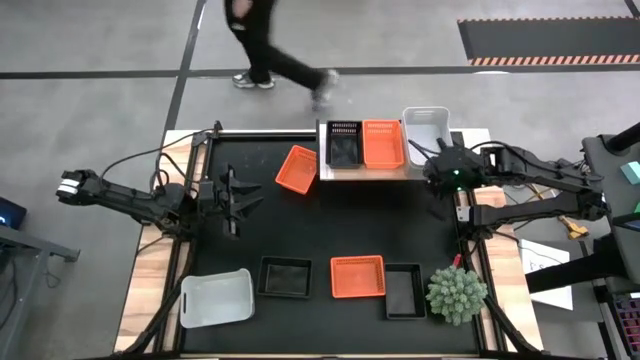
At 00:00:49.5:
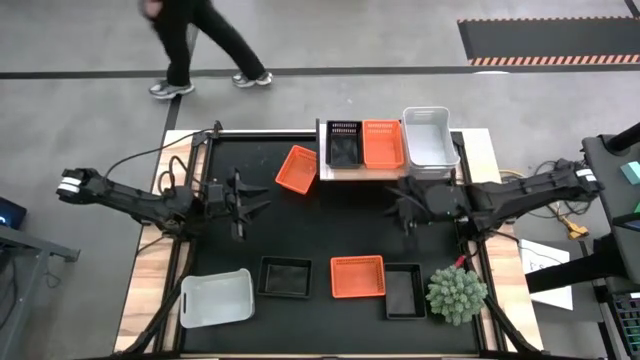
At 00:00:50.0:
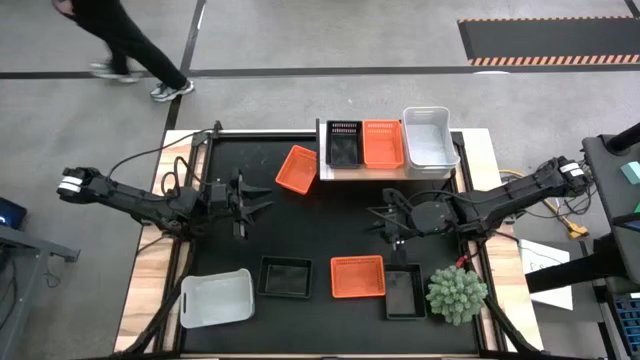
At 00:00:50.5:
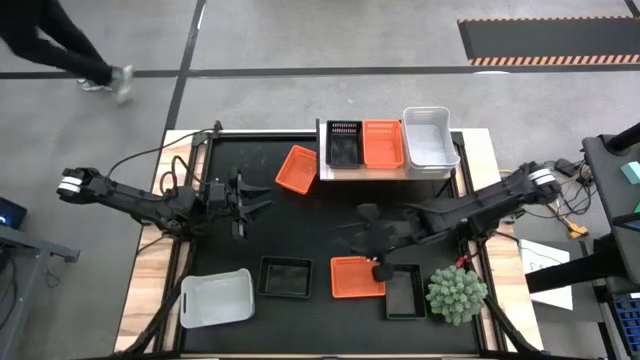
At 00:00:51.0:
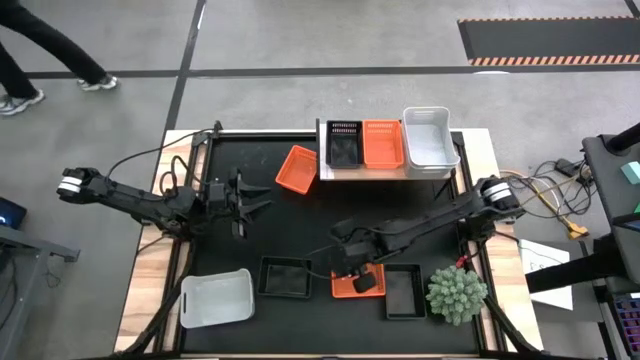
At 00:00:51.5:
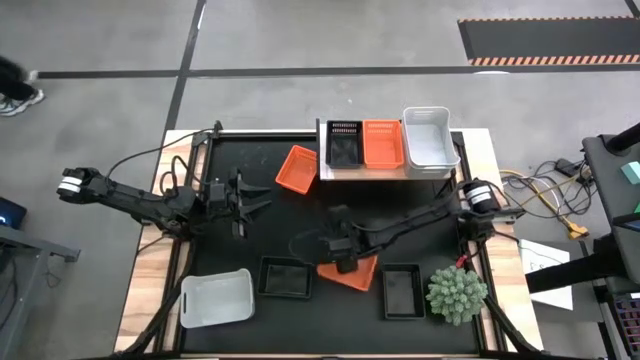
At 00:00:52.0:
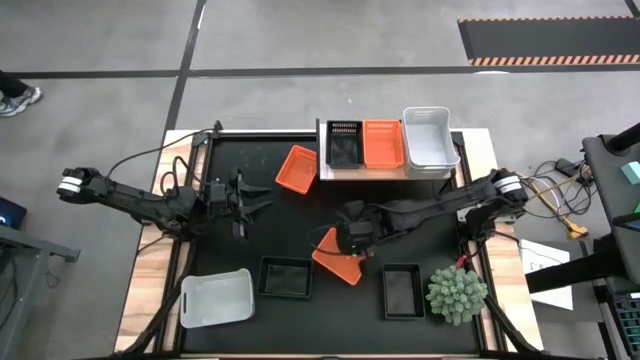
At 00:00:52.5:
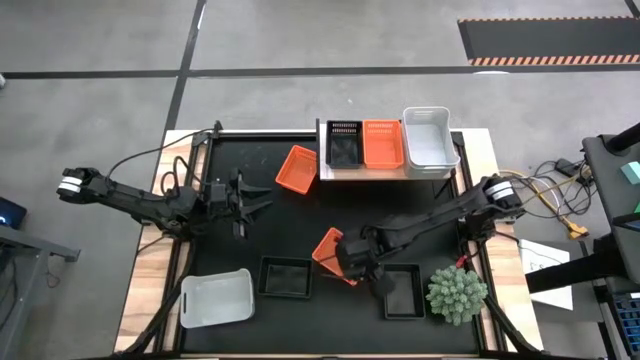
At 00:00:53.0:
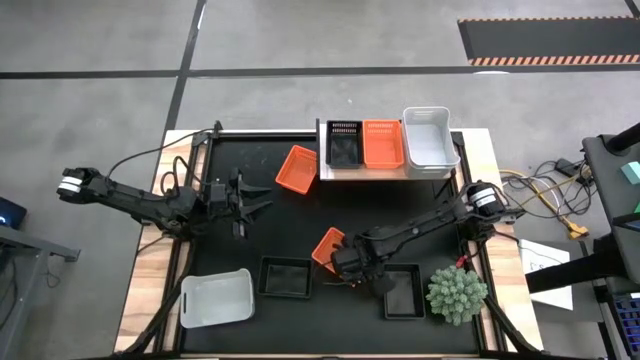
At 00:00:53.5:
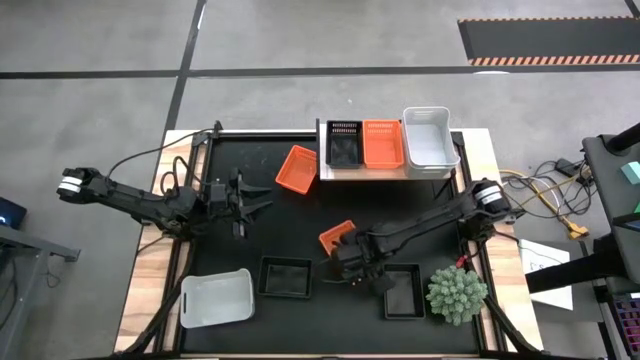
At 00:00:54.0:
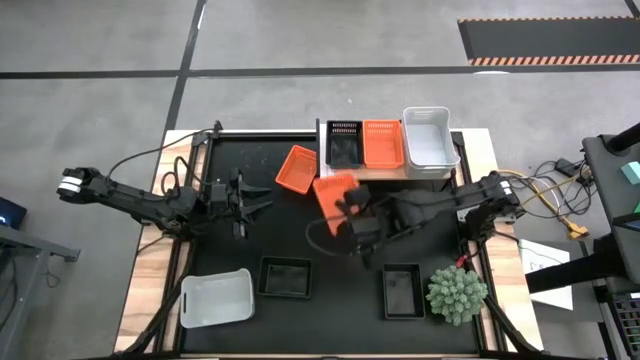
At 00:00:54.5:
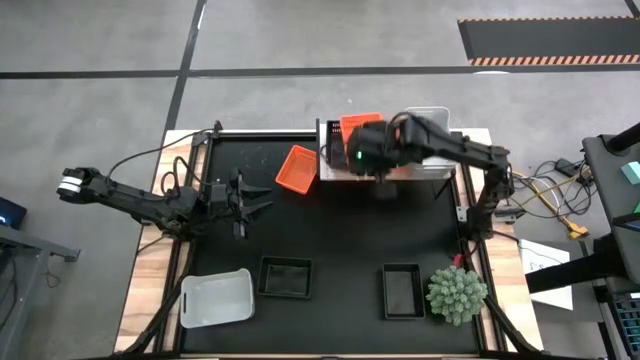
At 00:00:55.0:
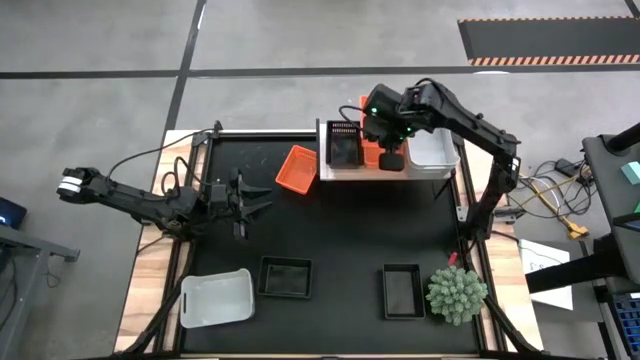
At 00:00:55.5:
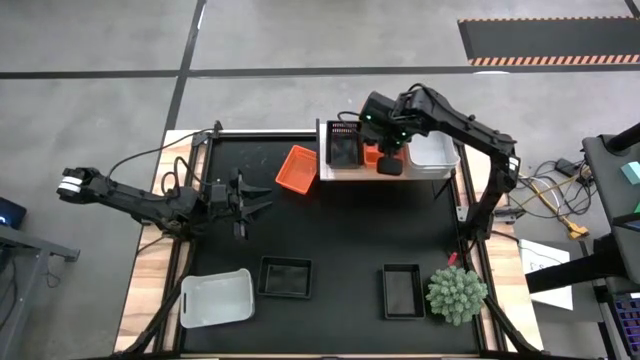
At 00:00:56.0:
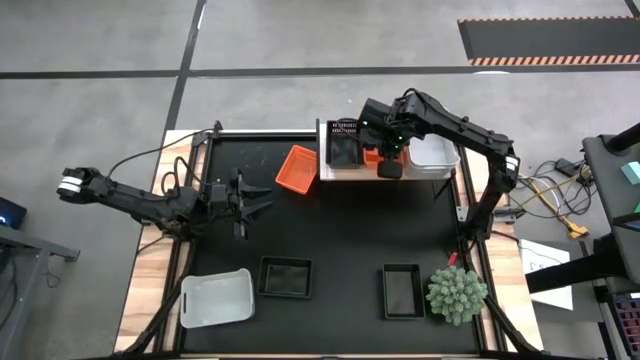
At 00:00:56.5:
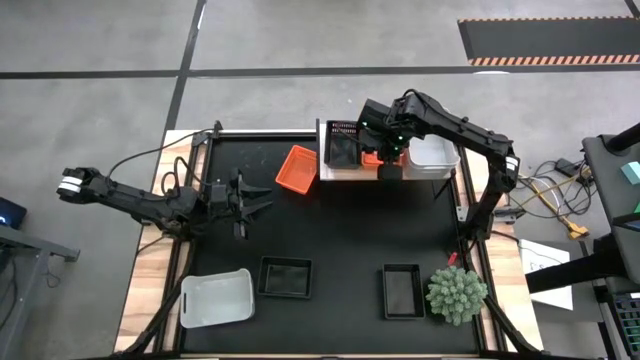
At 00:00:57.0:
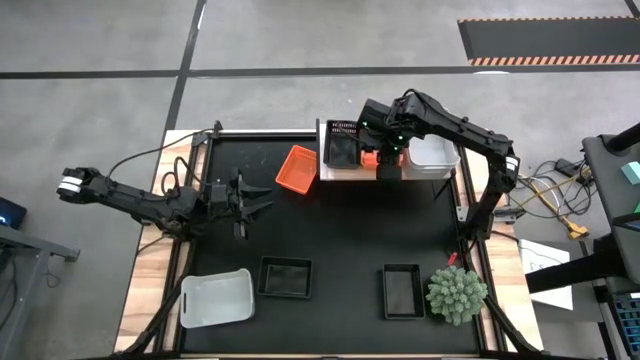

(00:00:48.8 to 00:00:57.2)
Stack the bottom orange basket on the orange basket on the shelf

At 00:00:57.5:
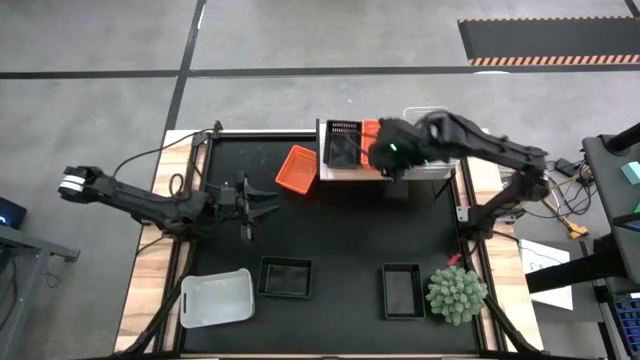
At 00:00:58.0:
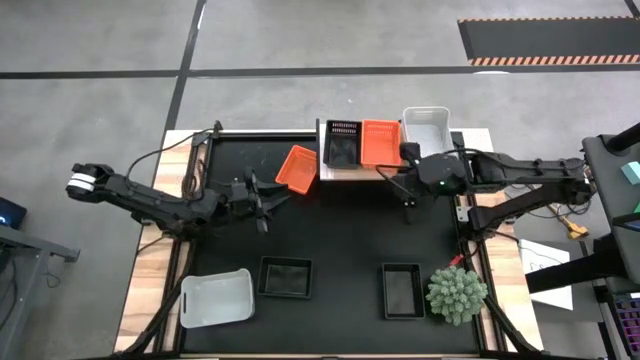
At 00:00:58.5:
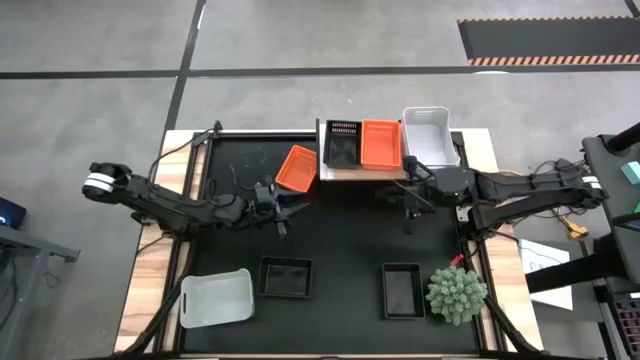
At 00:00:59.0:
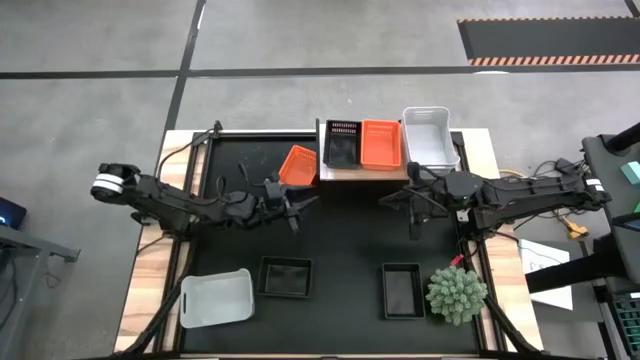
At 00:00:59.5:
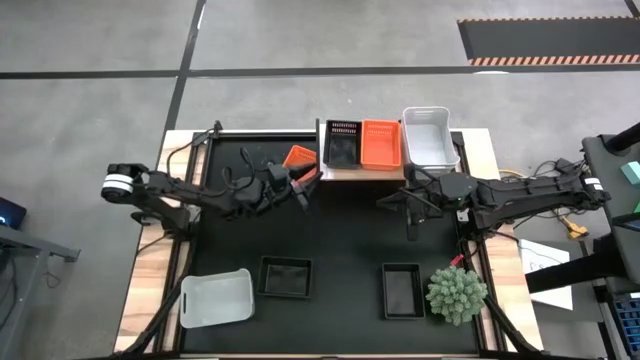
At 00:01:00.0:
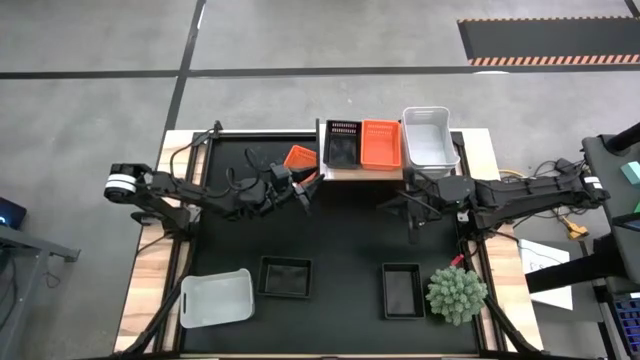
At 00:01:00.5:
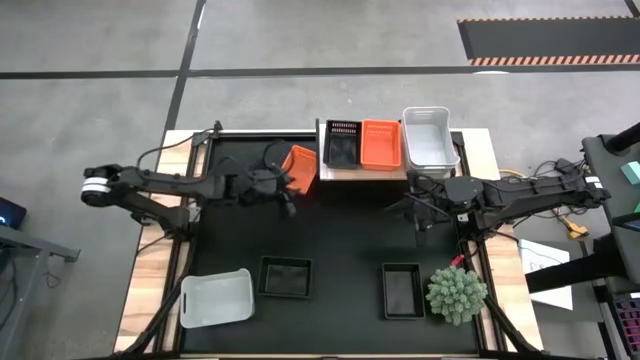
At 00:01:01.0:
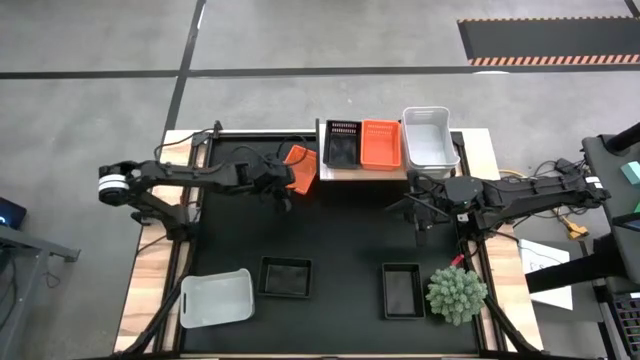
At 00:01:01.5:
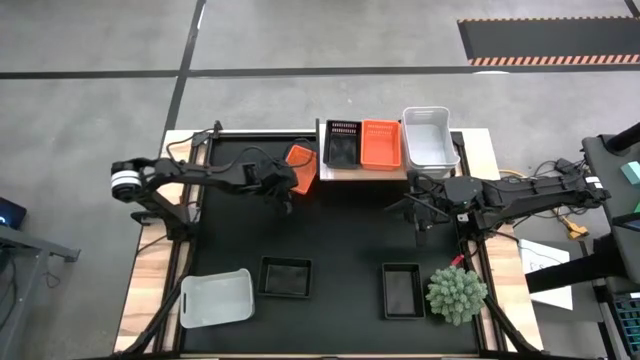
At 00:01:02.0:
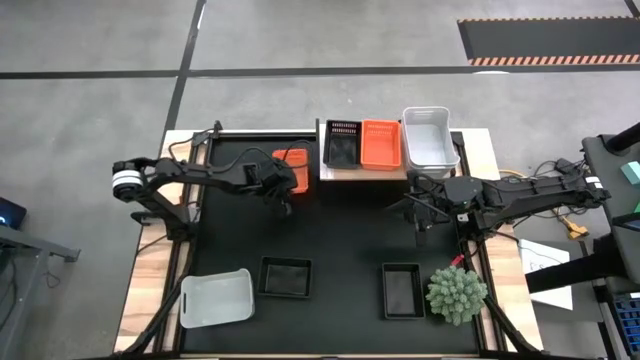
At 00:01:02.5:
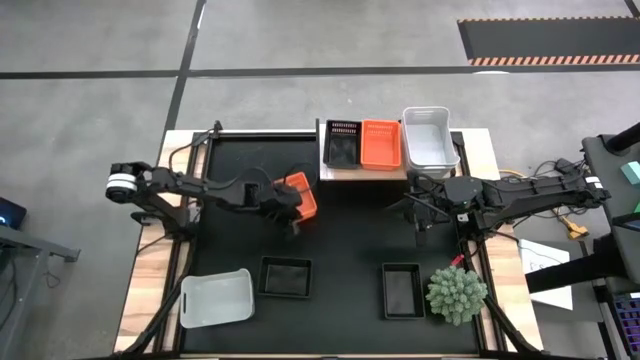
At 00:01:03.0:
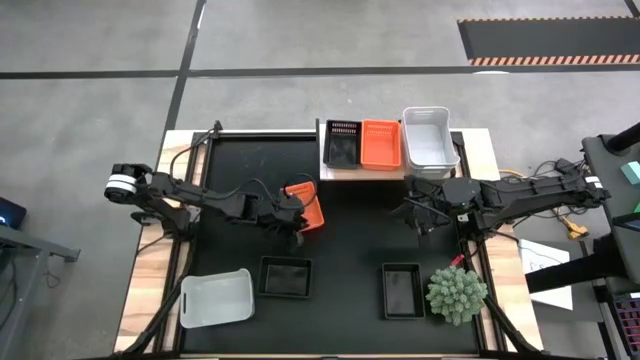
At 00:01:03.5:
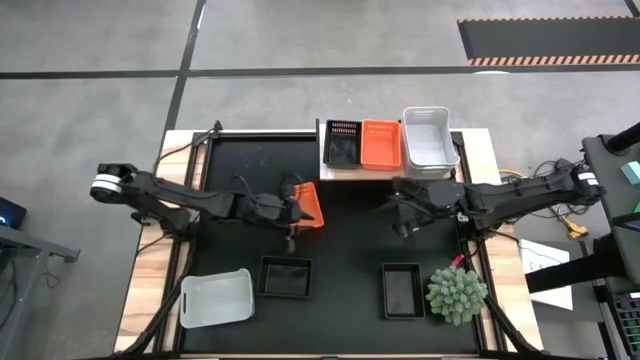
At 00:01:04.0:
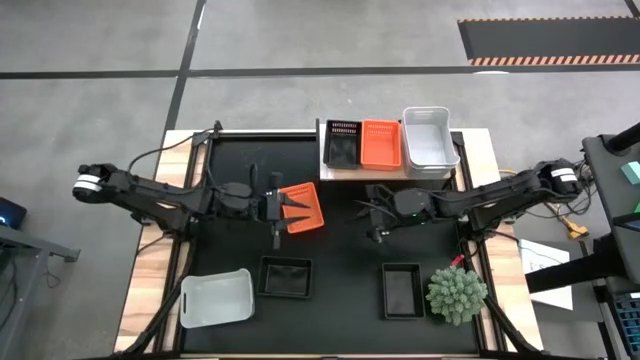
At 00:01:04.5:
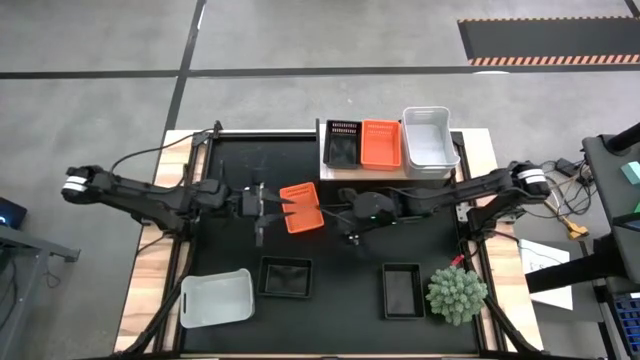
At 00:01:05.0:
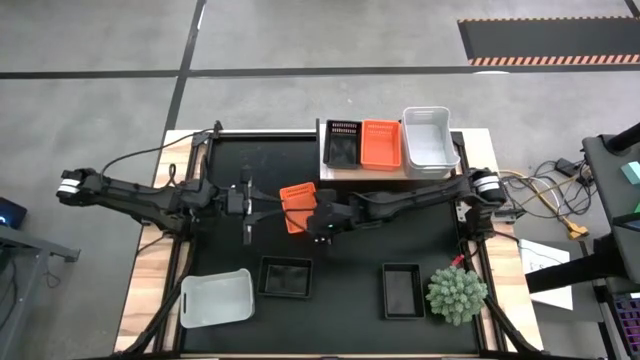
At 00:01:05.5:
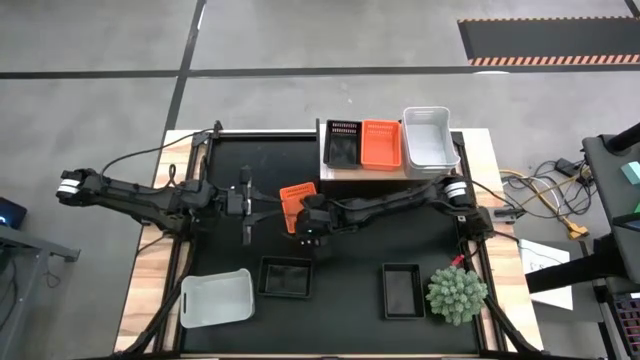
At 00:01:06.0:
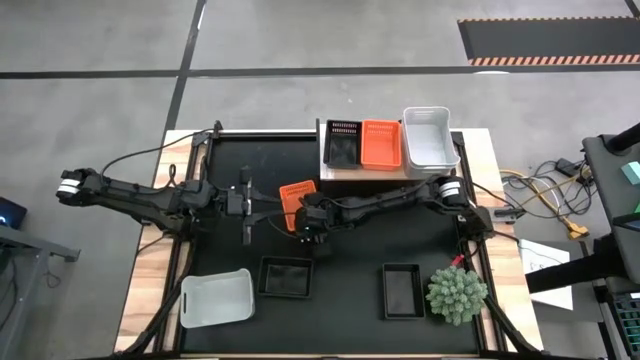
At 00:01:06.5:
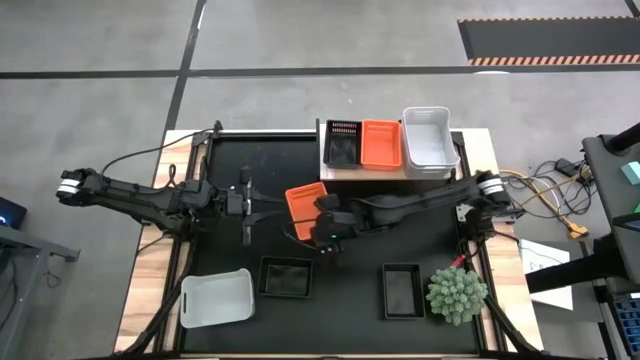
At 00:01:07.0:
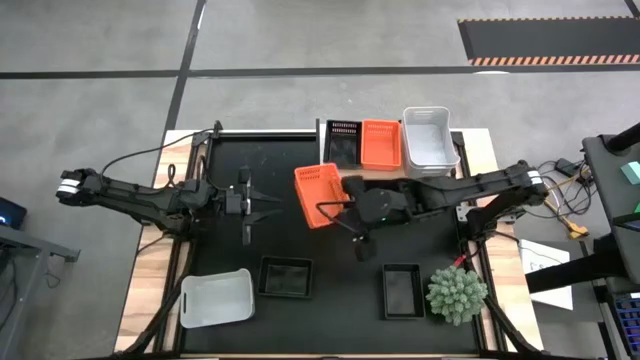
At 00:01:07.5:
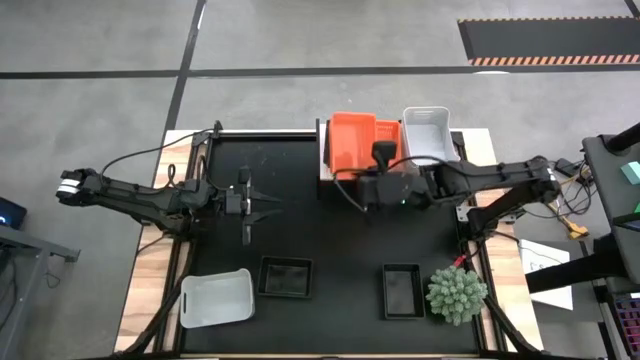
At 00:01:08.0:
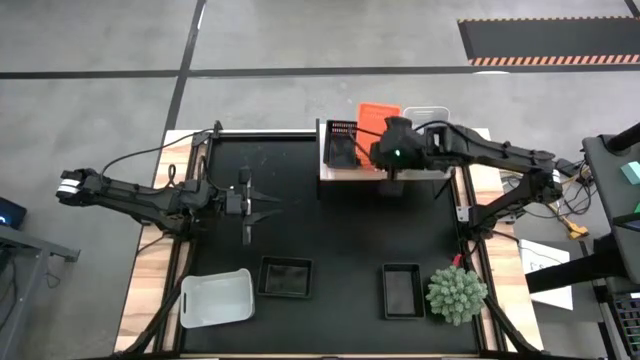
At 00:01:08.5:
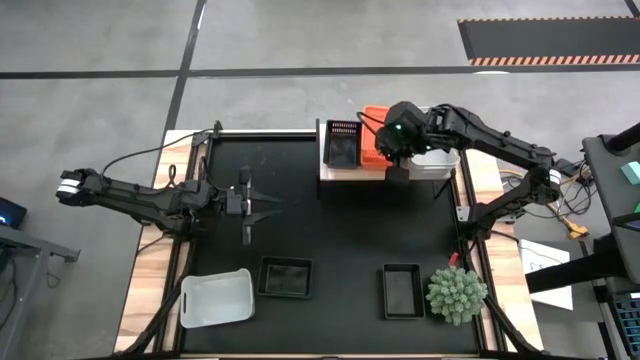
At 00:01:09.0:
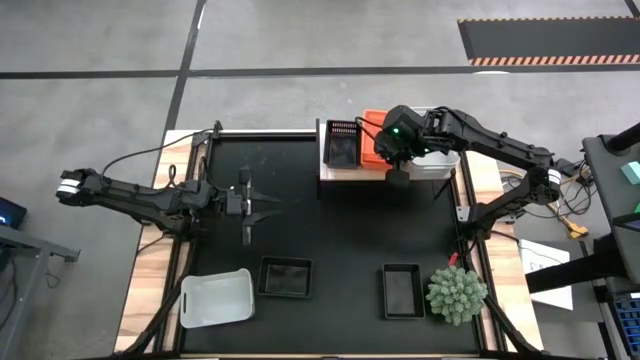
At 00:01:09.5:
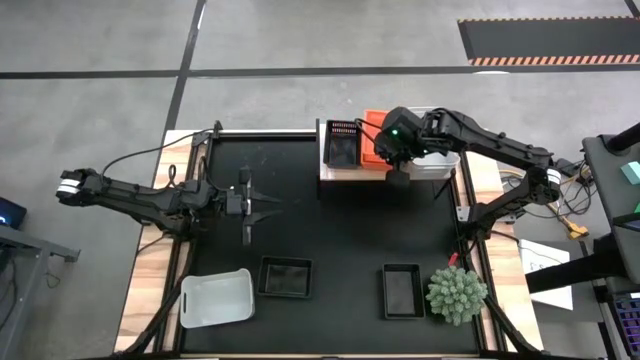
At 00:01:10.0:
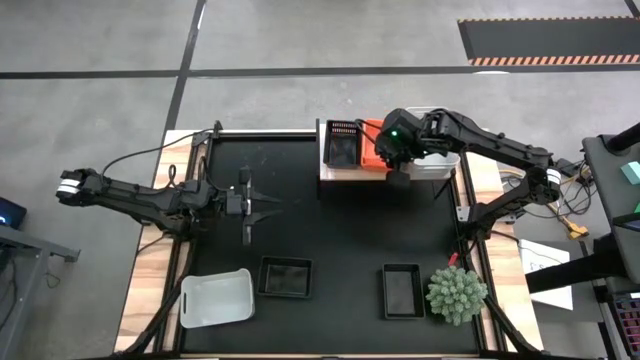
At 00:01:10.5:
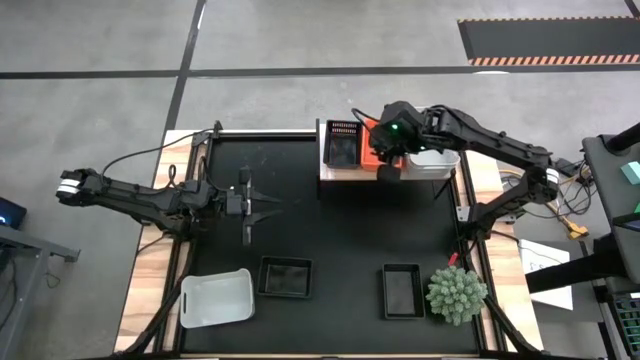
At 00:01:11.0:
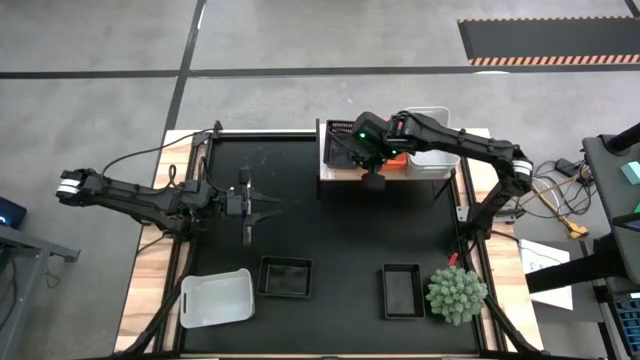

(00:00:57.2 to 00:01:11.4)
Stack the orange basket on the orange basket on the shelf
